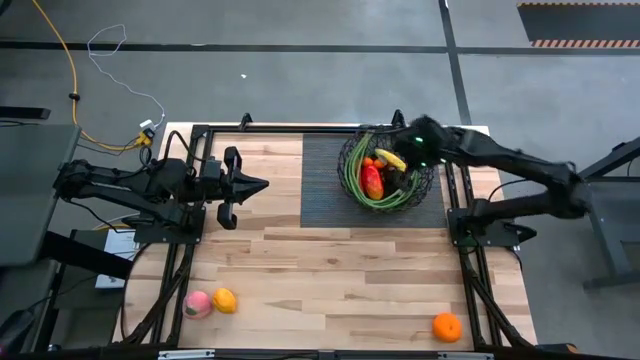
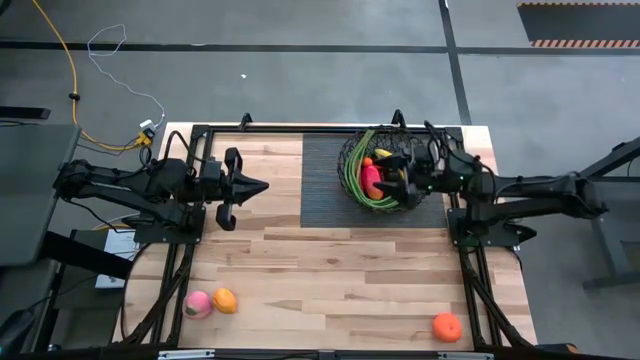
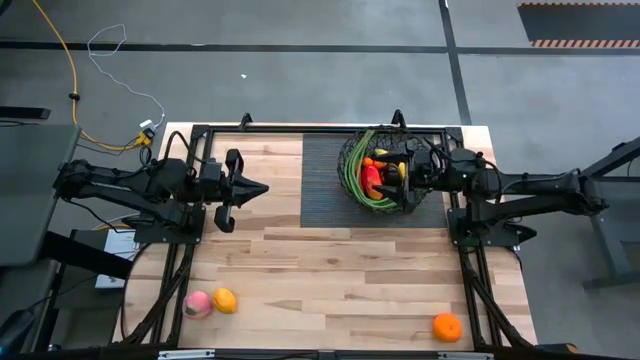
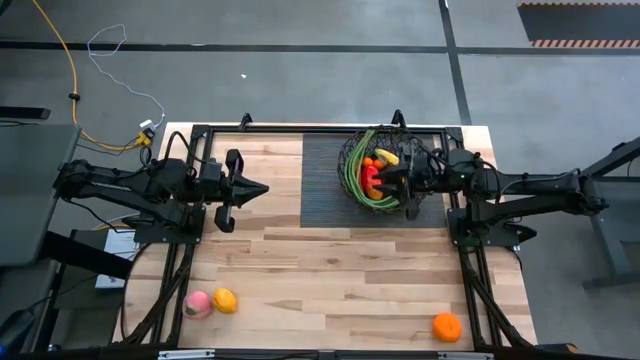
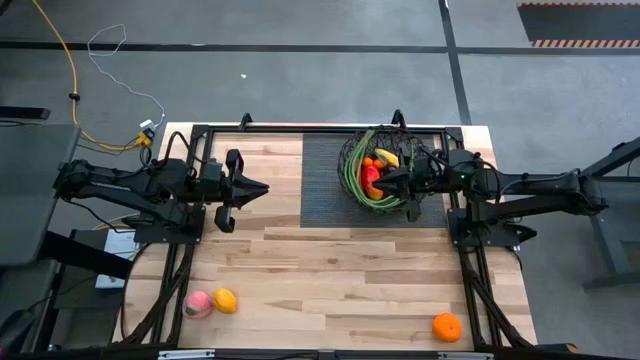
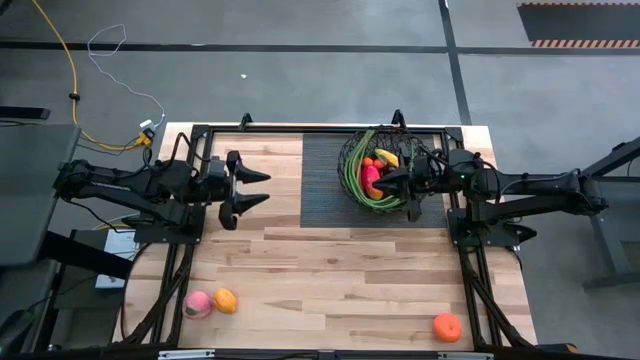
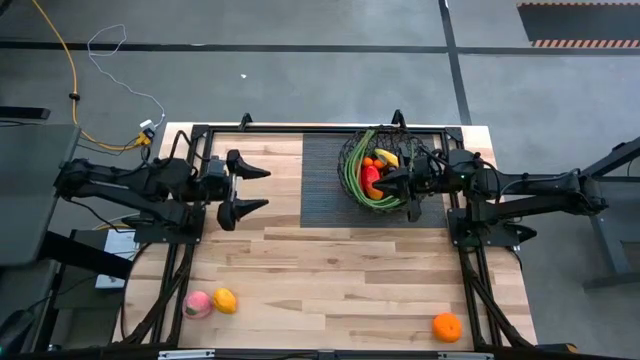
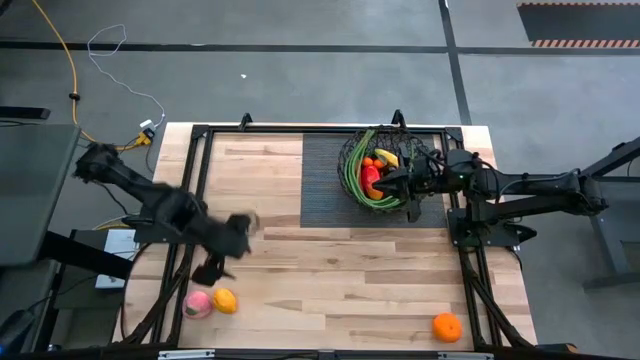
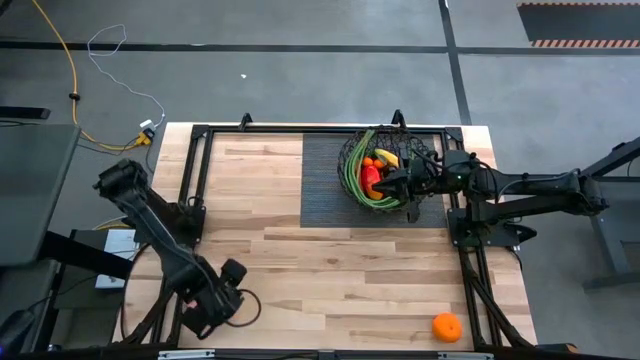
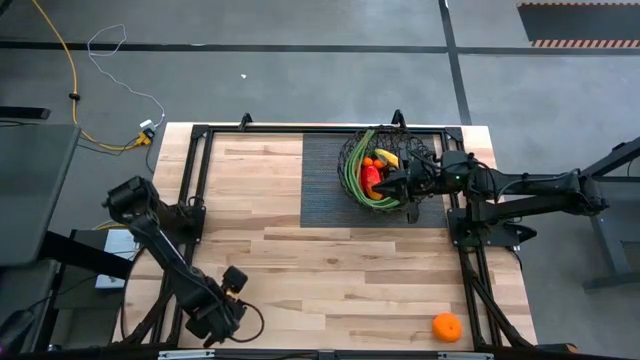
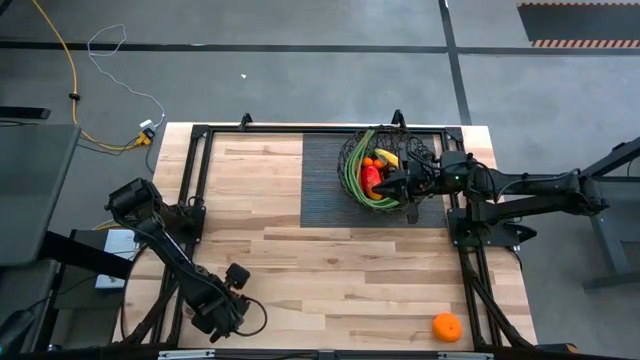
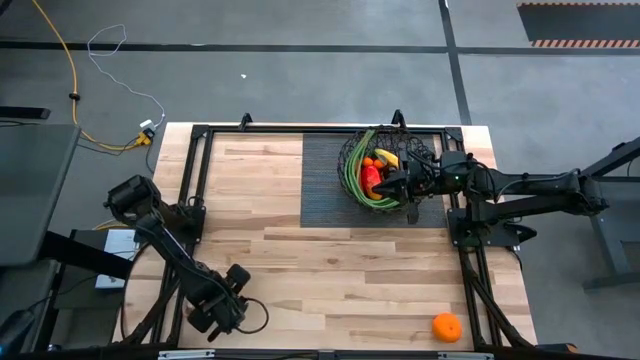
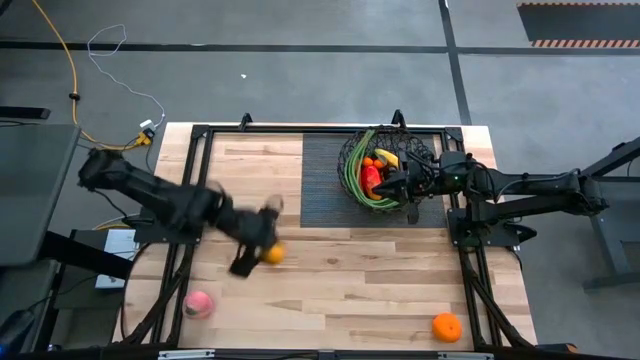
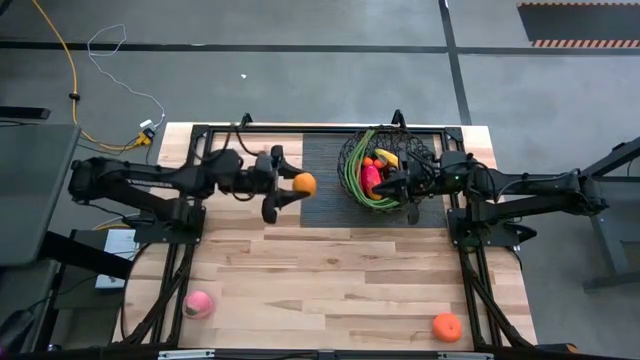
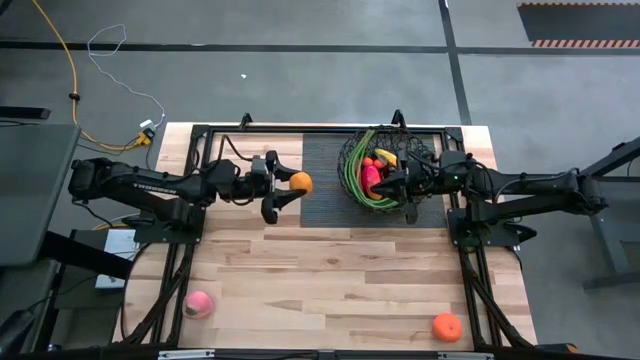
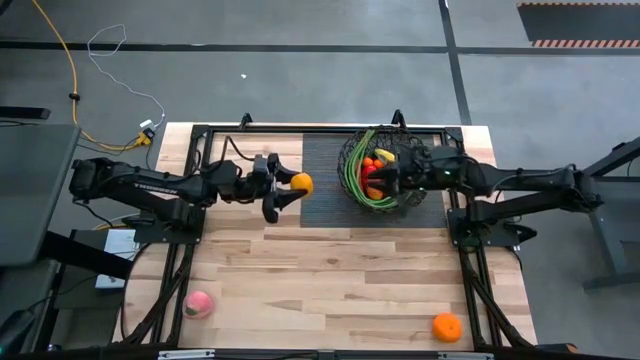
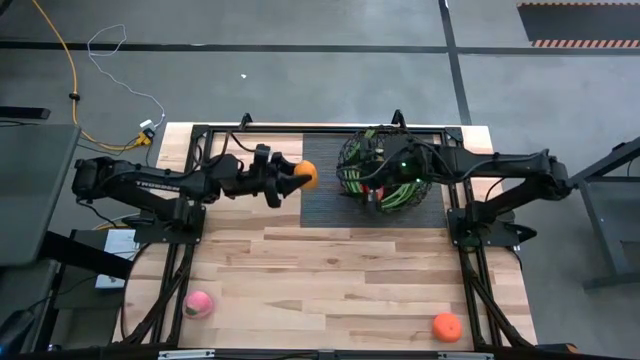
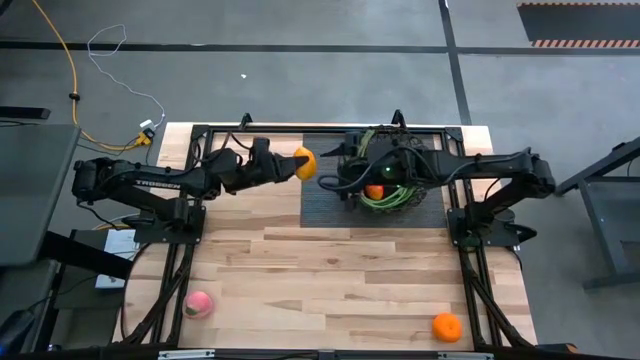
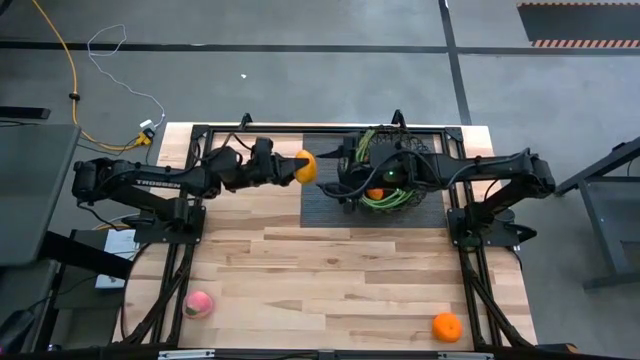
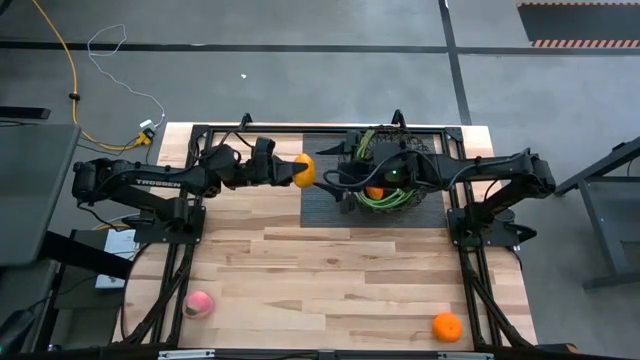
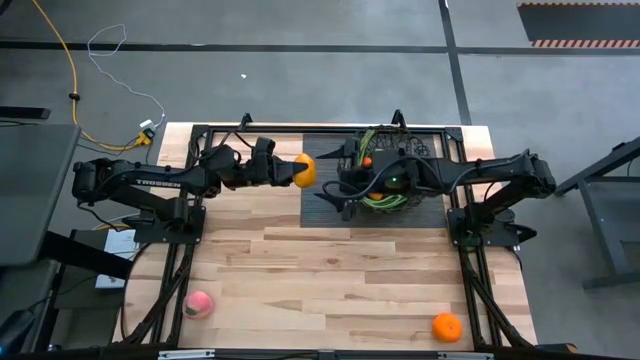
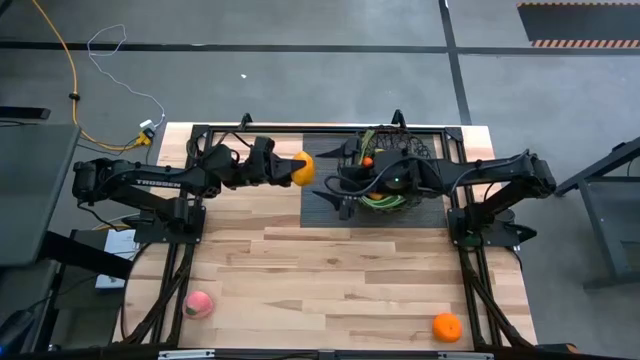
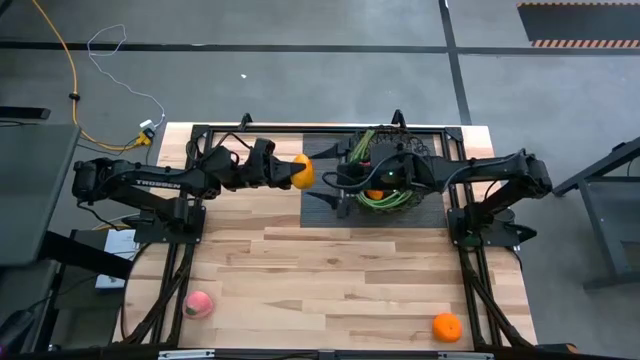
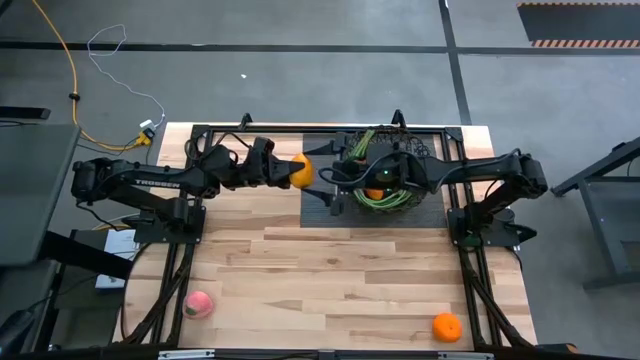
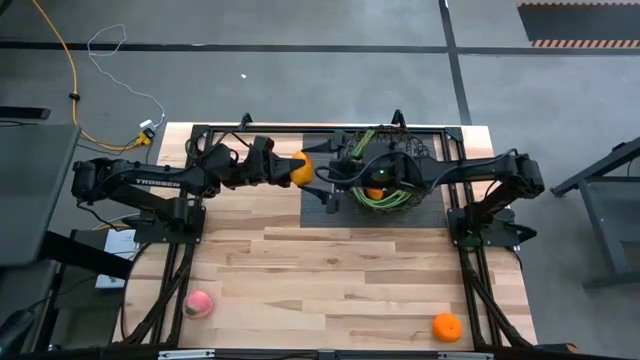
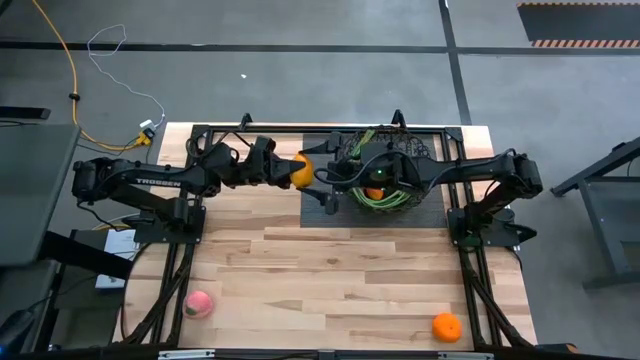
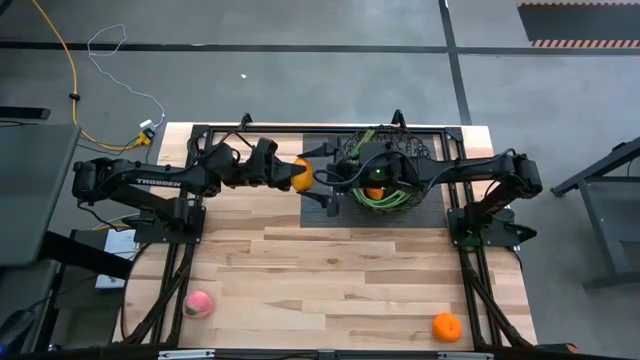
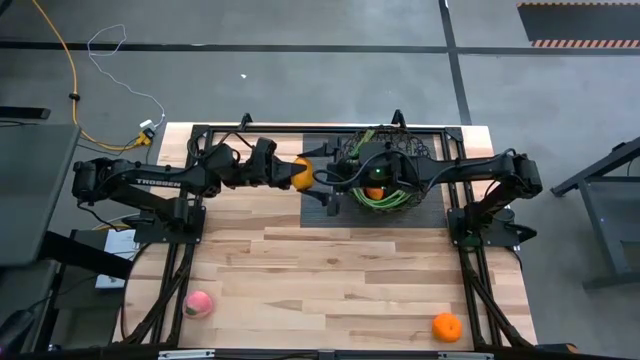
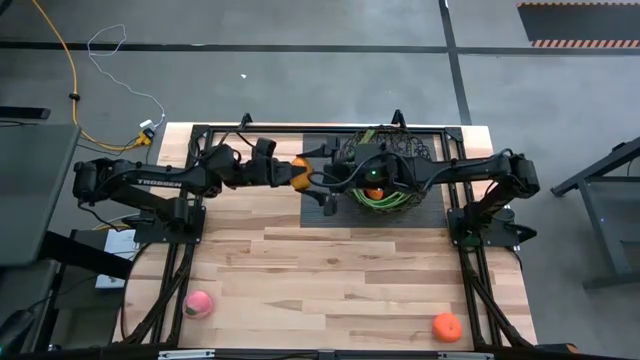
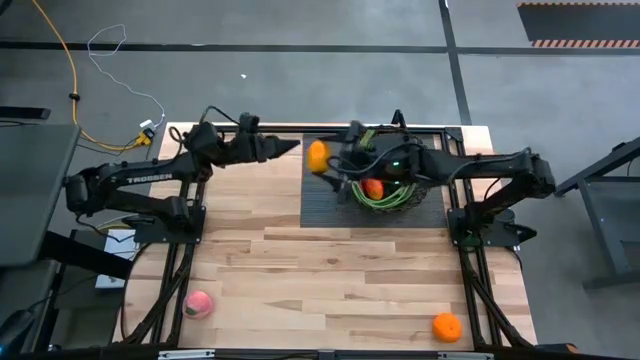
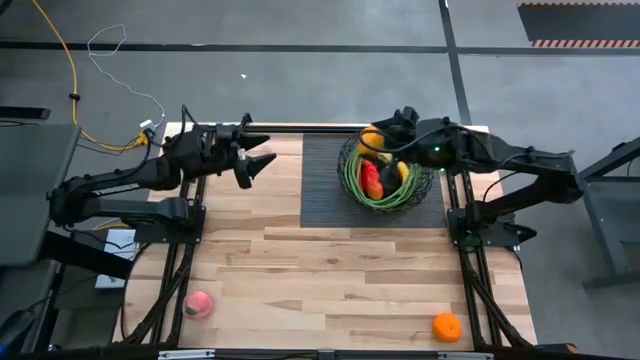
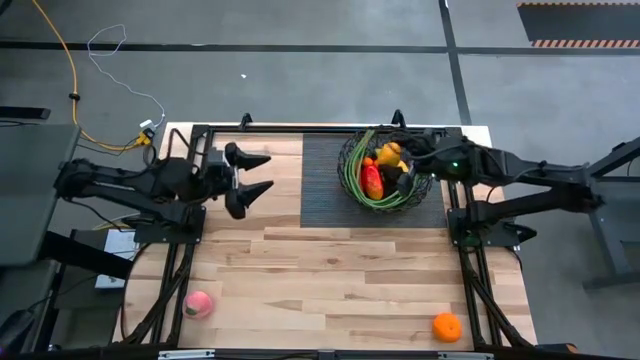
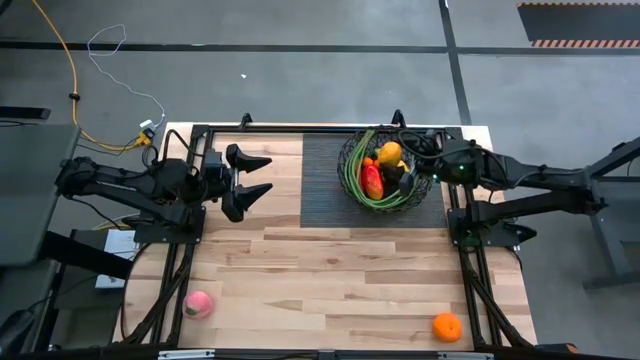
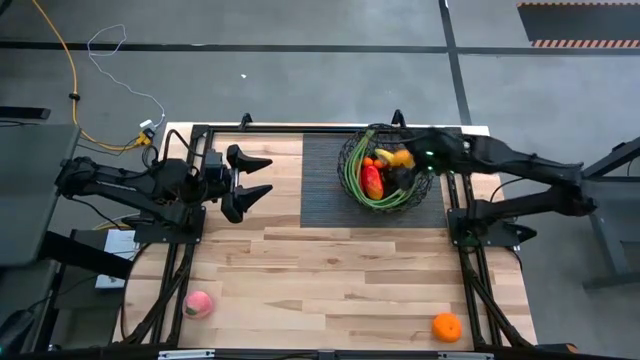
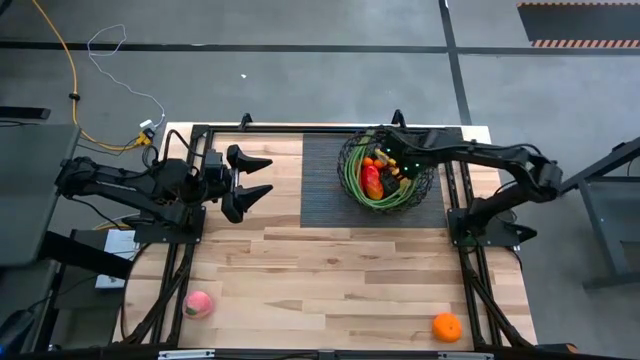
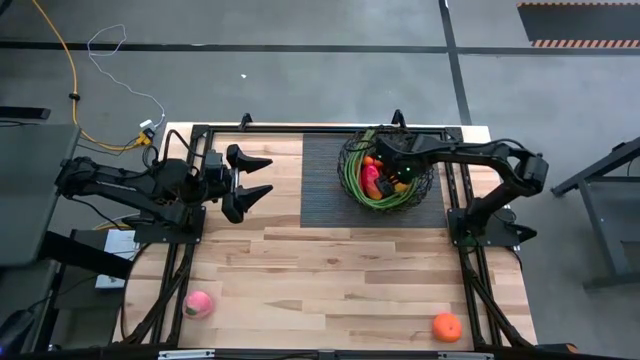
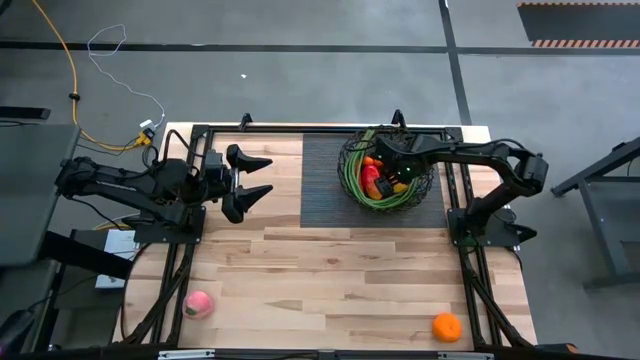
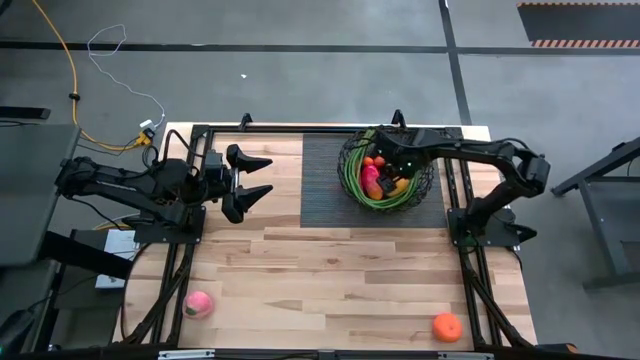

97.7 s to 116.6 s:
Task: Build produce basket
Put the lemon into the black basket
